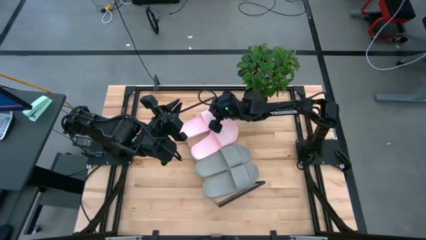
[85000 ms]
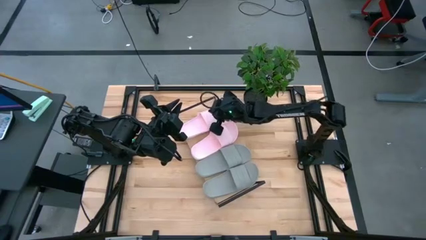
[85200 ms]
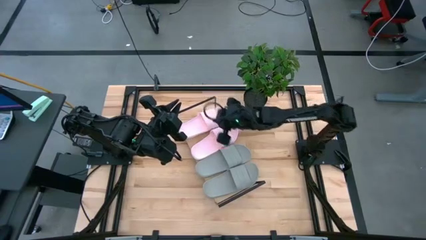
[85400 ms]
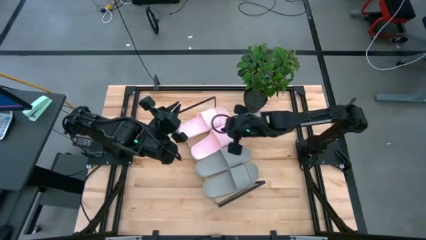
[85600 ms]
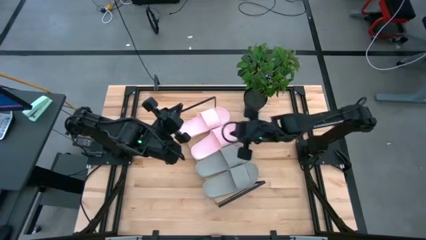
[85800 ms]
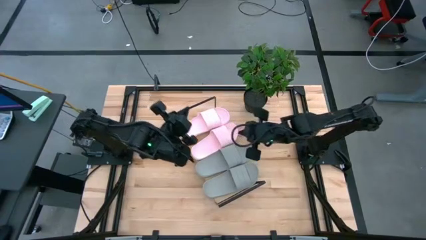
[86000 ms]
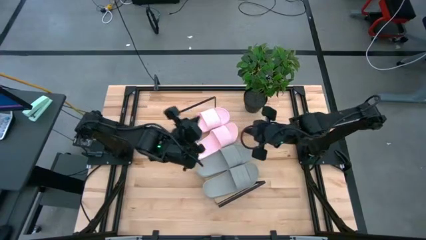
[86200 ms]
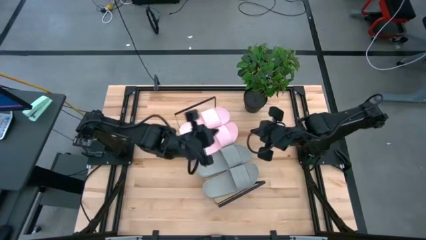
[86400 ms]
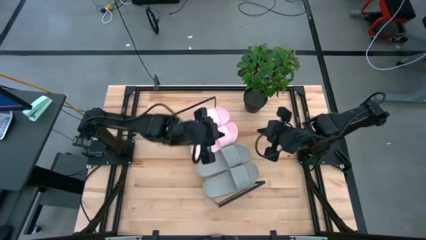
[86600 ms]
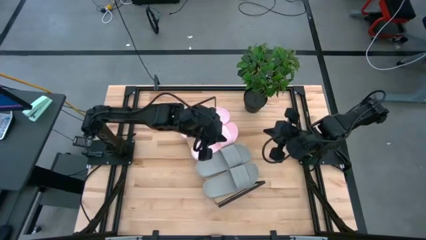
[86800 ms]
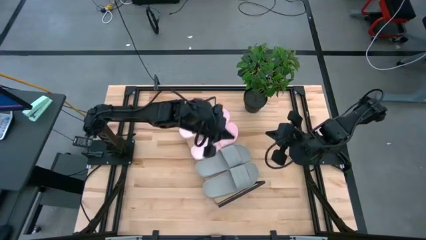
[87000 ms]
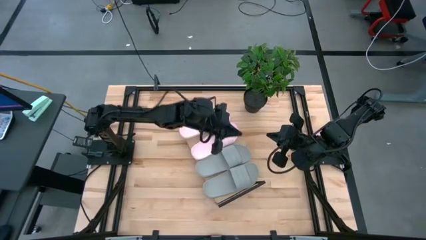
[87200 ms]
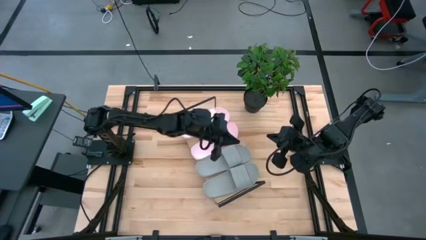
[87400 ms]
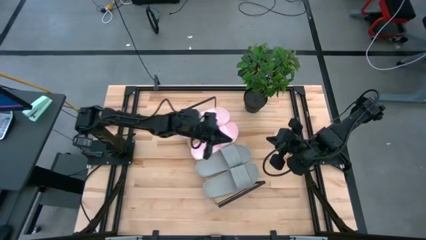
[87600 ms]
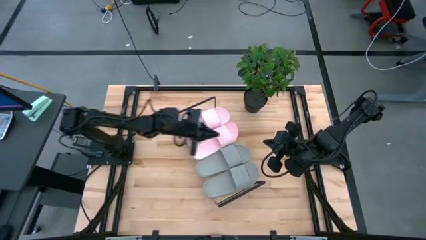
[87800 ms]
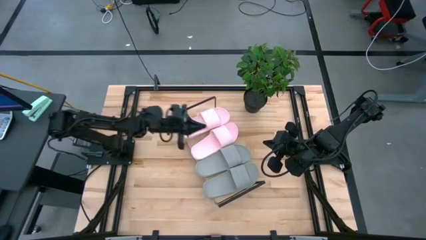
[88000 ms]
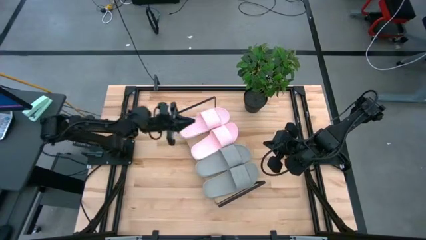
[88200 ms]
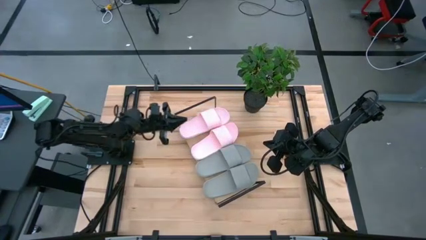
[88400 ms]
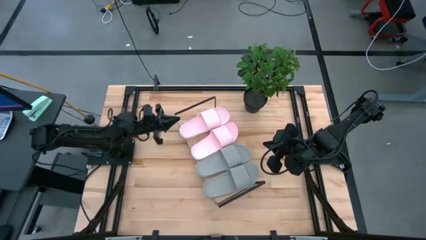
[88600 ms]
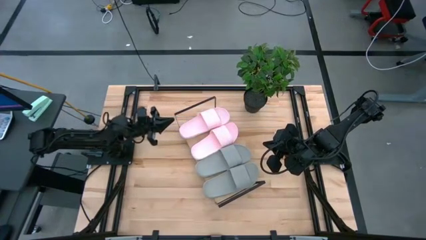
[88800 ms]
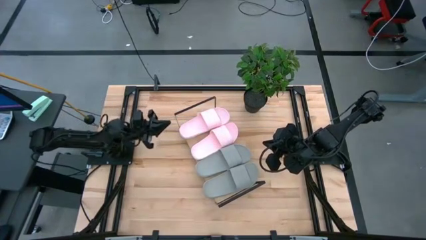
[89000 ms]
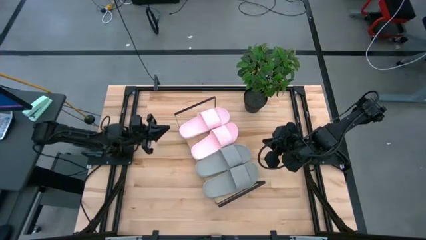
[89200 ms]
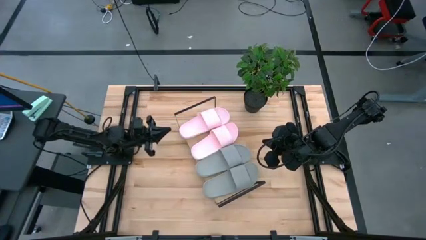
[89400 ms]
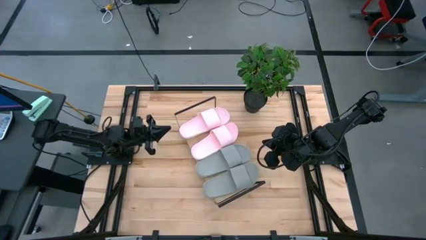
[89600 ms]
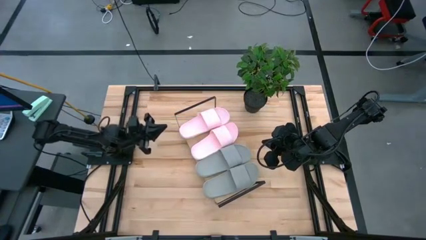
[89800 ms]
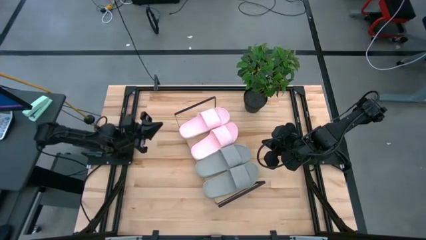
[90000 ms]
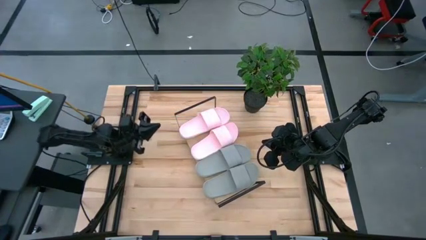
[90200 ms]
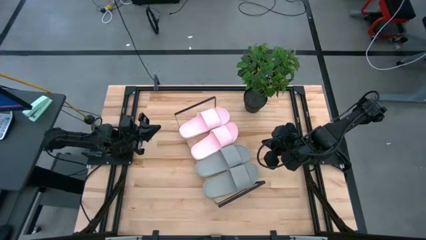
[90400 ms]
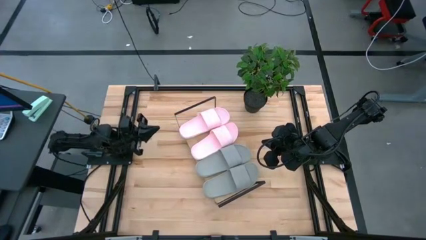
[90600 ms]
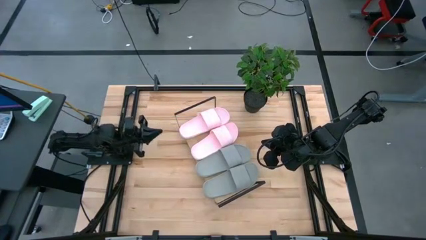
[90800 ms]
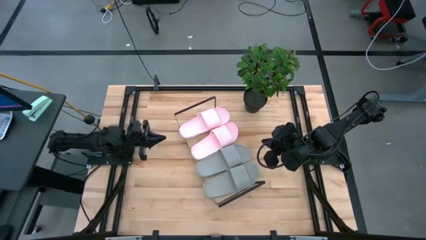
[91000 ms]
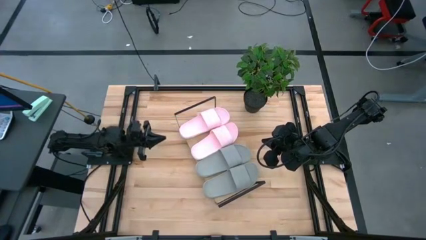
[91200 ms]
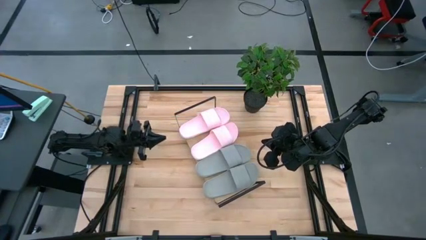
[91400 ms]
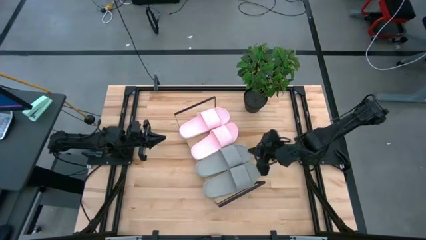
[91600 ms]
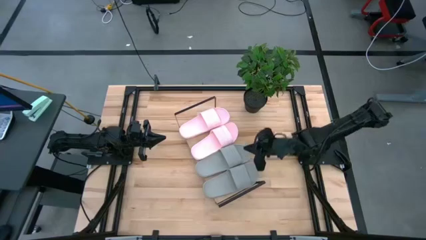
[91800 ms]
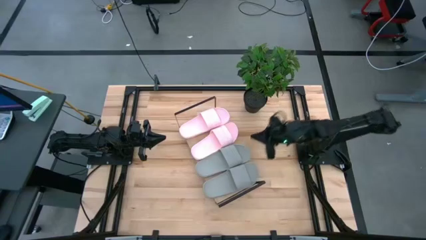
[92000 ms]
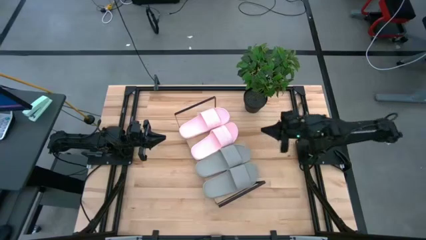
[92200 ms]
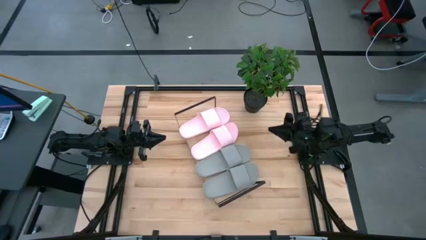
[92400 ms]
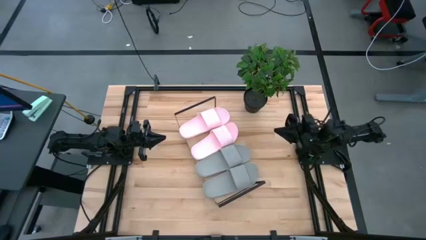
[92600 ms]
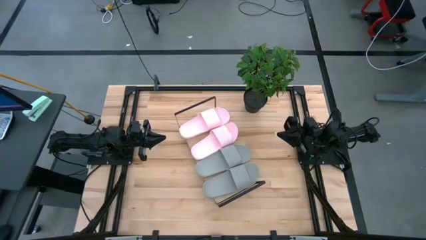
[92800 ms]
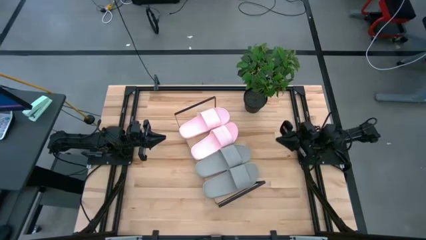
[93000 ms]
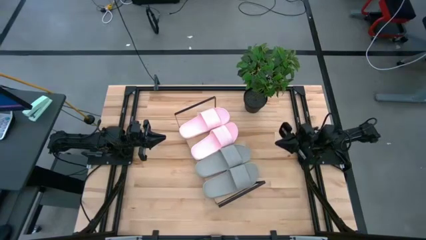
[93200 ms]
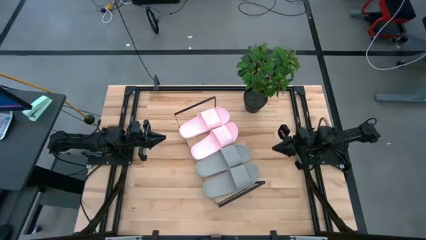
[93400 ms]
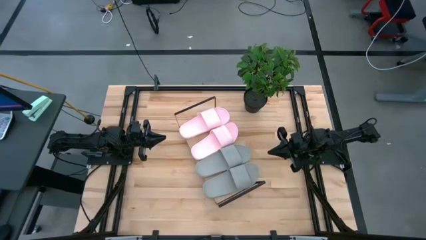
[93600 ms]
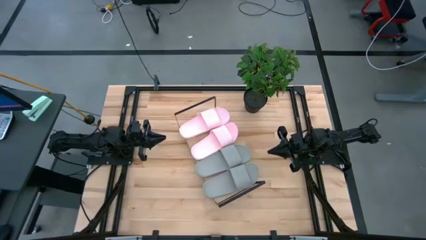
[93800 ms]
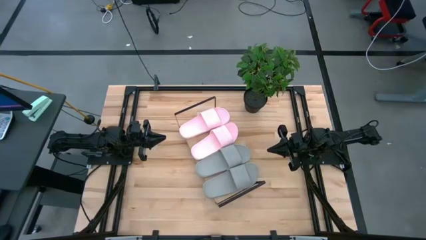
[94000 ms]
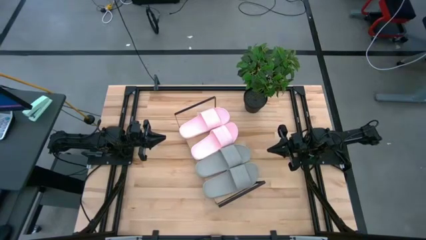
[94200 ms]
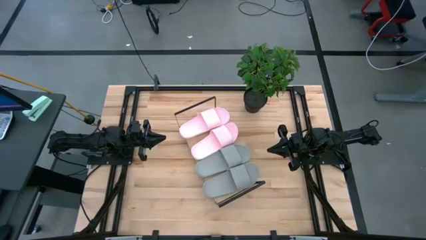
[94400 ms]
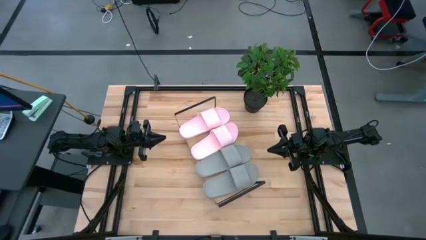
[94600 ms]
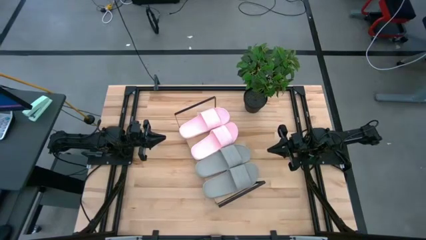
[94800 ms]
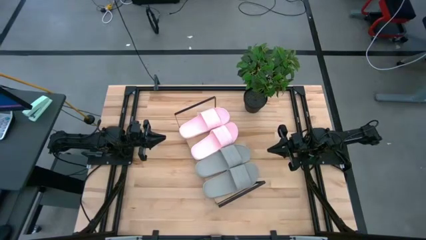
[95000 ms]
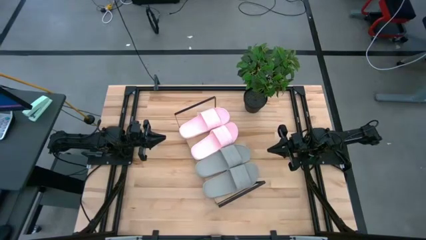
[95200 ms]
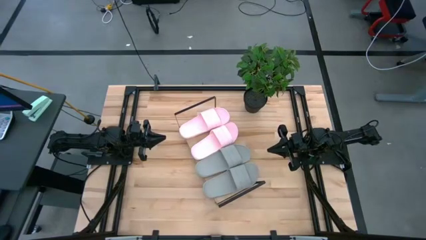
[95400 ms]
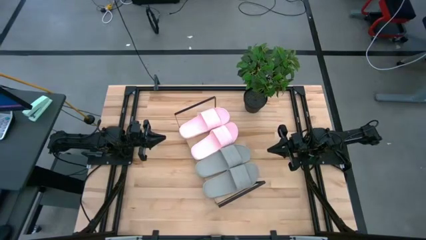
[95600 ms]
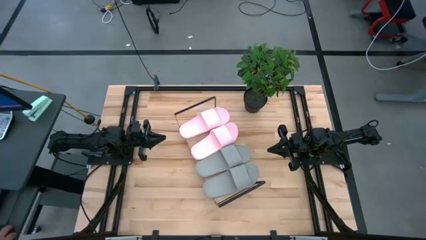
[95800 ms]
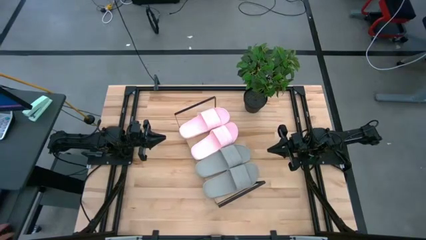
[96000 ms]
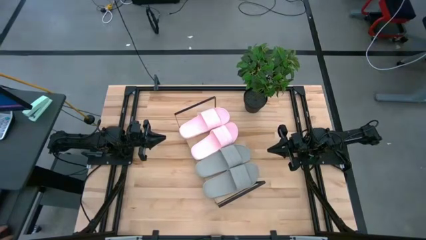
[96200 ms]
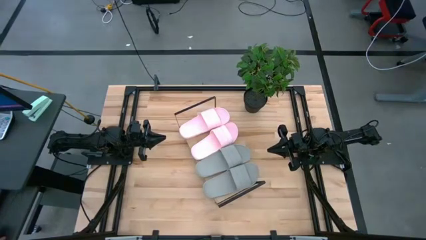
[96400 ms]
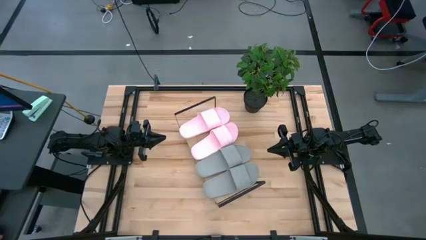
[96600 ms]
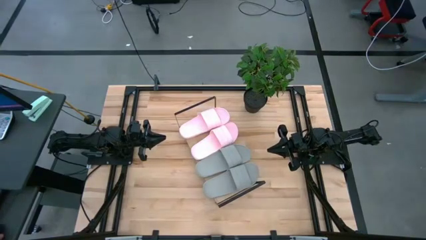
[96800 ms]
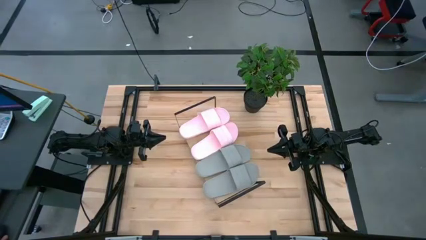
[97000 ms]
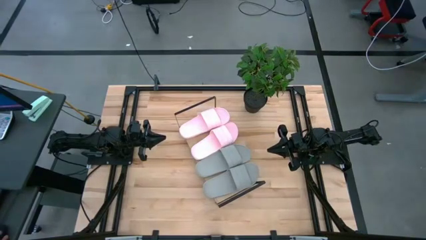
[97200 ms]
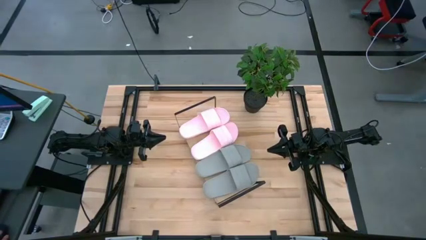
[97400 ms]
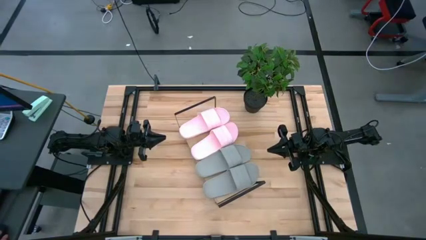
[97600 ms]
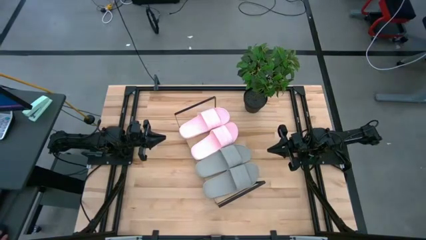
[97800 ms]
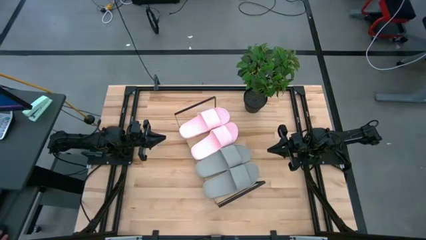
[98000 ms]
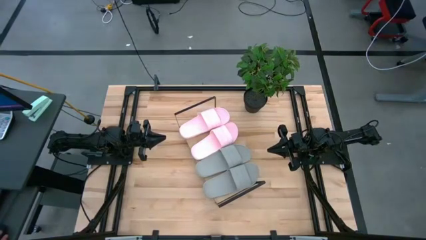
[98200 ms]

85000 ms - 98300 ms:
Task: Pick and place slides into the shelf
Return to Home Position
